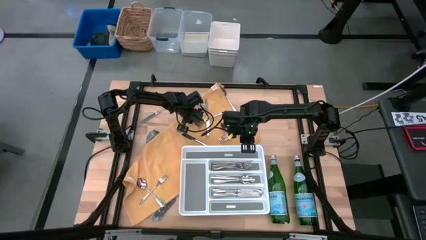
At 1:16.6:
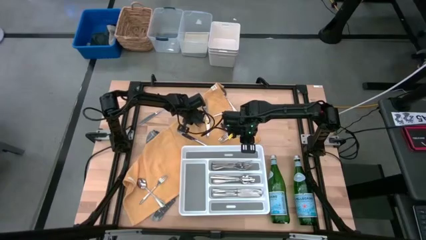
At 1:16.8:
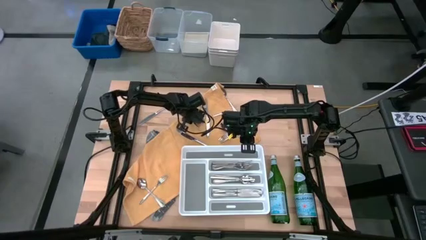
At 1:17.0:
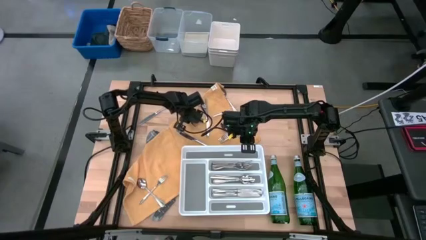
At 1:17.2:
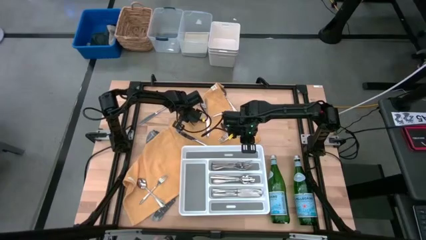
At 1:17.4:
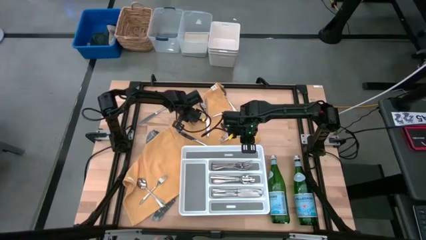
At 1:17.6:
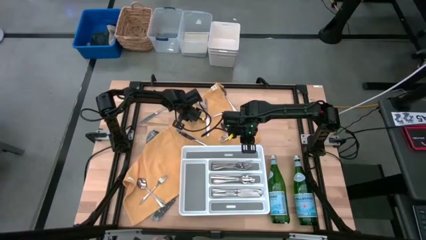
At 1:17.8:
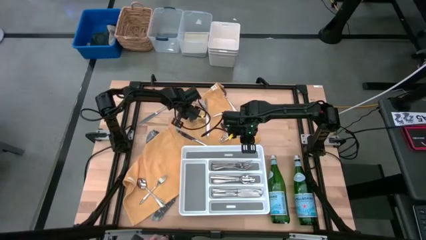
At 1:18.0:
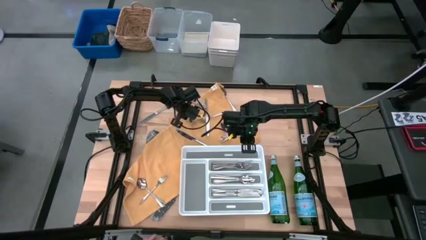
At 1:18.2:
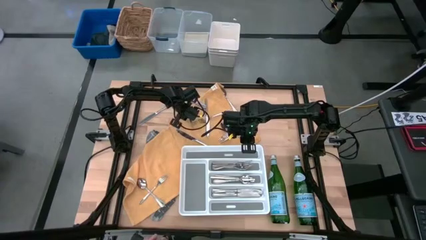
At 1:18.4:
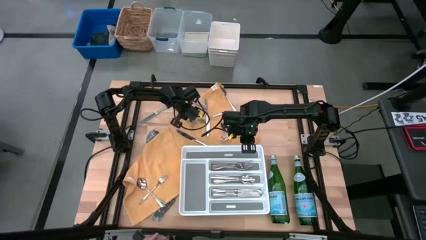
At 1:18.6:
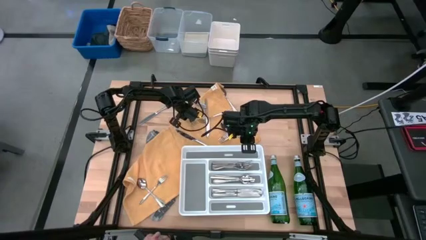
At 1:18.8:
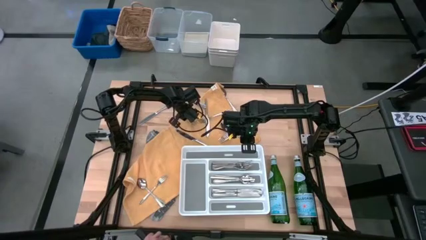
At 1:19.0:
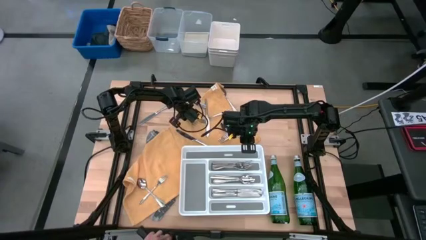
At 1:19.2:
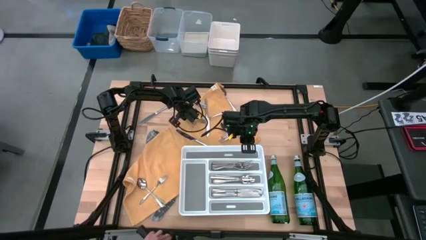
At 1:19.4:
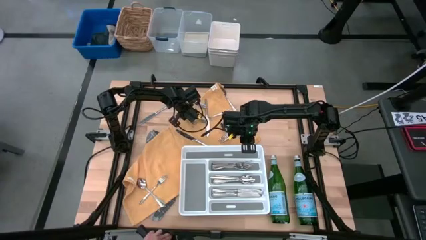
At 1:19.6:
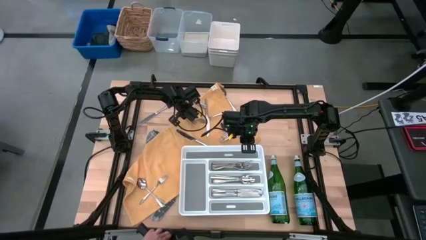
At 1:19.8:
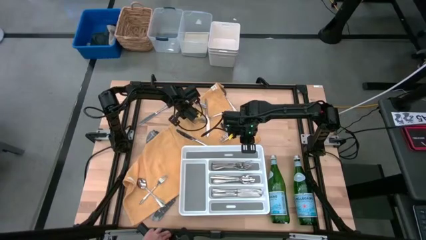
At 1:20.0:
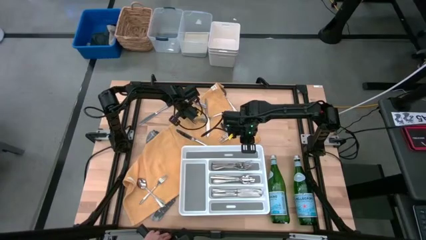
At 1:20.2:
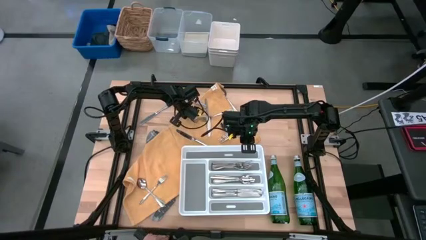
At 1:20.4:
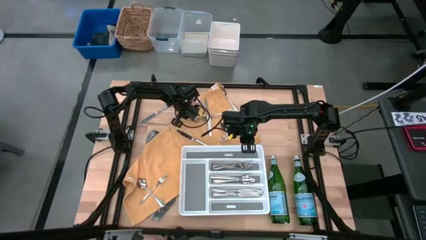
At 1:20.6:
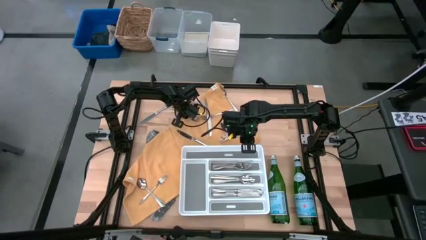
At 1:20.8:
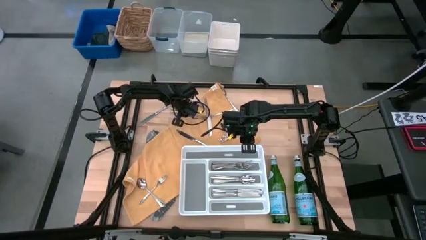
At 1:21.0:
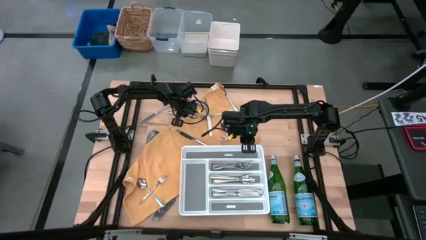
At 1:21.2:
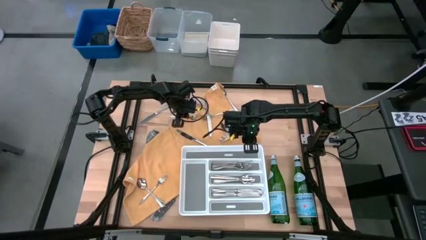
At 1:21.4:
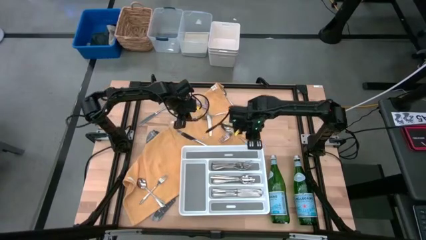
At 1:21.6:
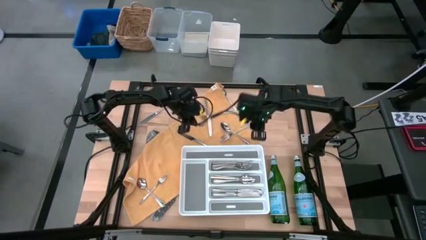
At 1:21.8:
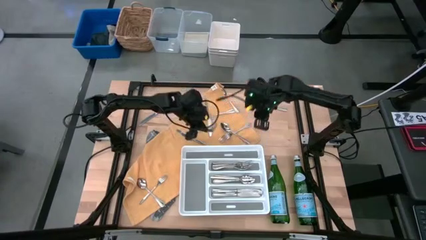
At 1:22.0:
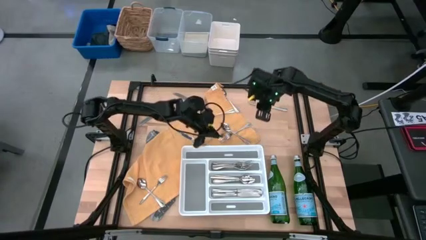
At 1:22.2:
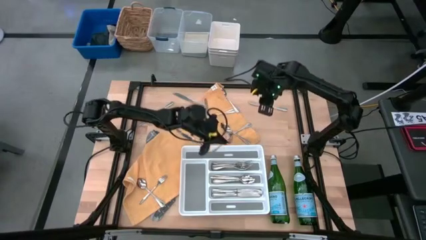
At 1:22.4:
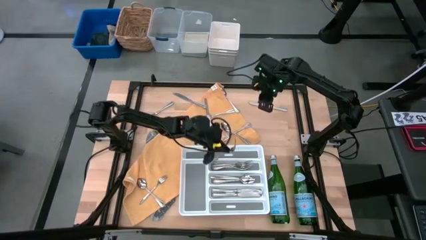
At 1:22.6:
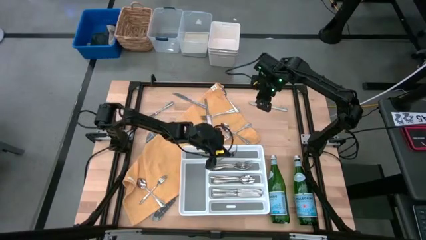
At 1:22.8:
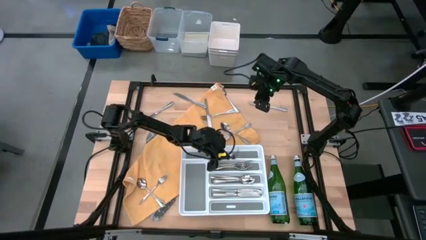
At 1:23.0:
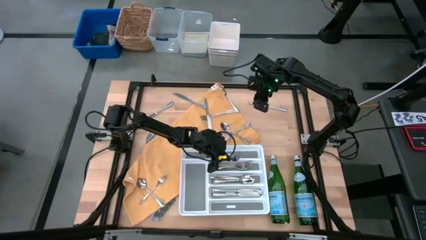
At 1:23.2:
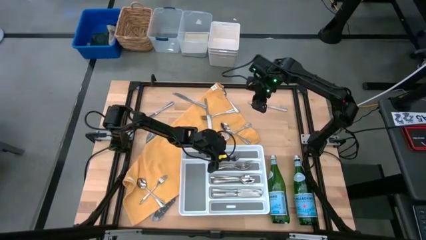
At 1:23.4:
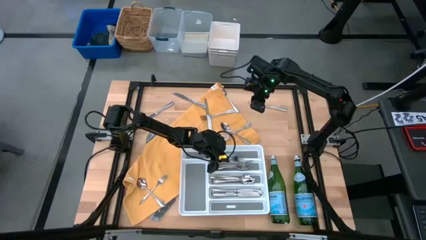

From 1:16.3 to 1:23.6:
Task: Sort silverware
Put the silver fork into the white silverware tray

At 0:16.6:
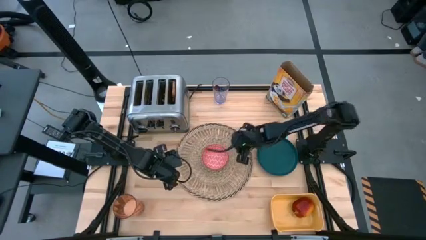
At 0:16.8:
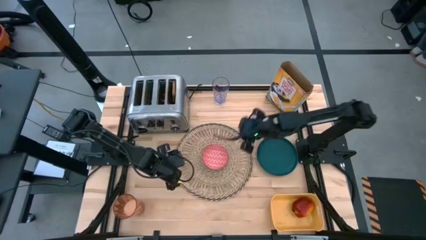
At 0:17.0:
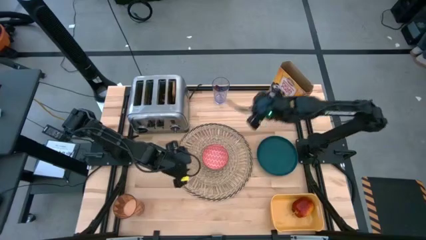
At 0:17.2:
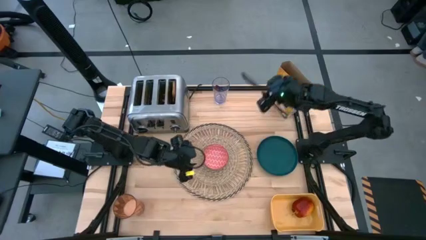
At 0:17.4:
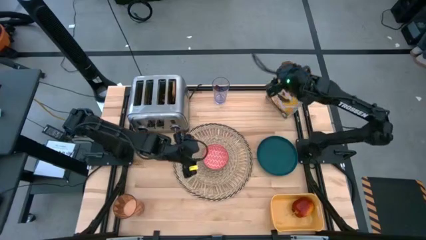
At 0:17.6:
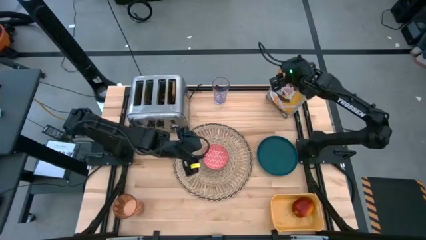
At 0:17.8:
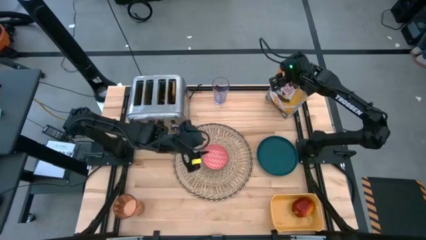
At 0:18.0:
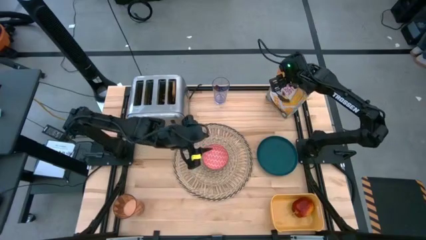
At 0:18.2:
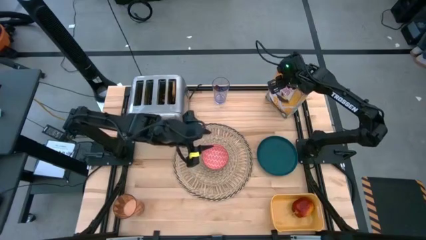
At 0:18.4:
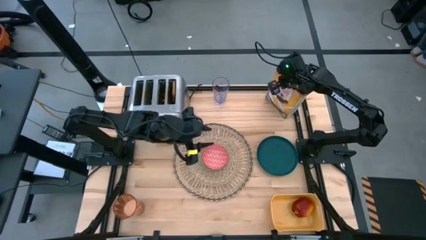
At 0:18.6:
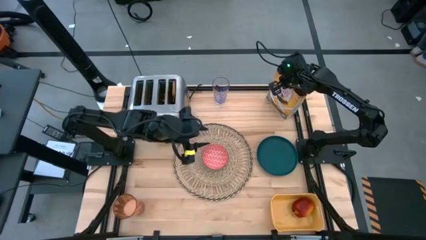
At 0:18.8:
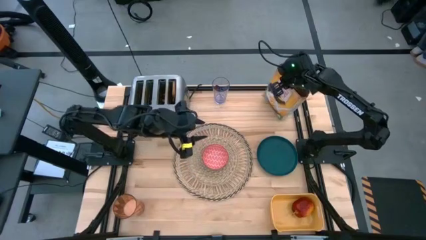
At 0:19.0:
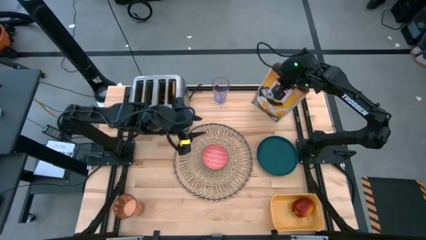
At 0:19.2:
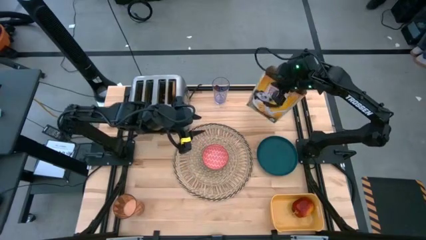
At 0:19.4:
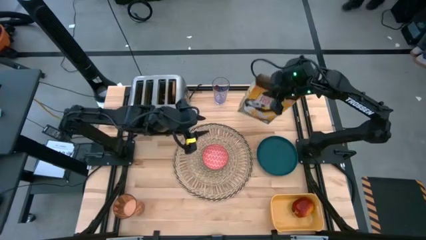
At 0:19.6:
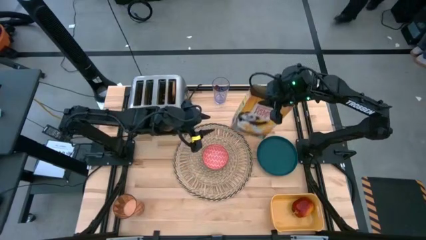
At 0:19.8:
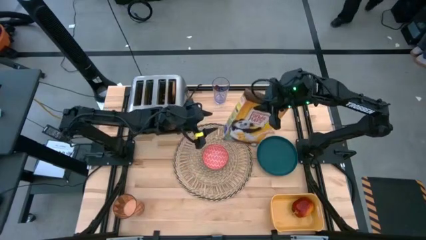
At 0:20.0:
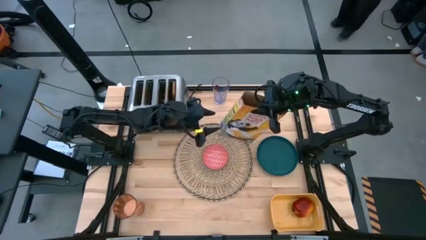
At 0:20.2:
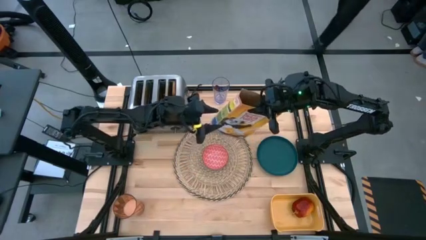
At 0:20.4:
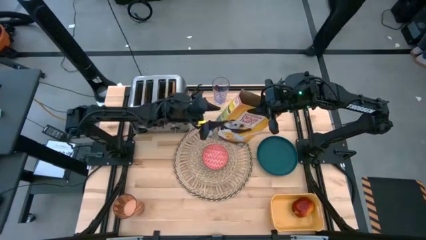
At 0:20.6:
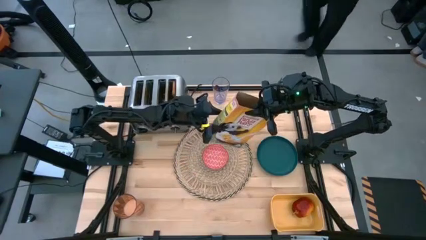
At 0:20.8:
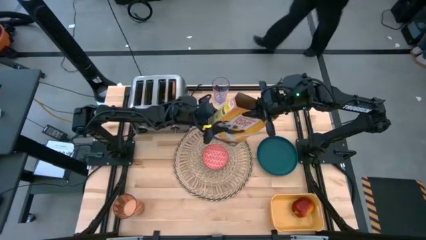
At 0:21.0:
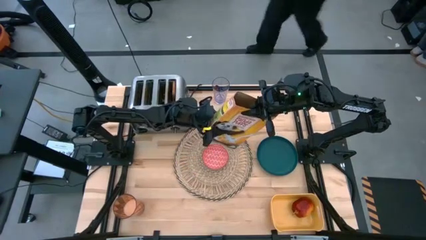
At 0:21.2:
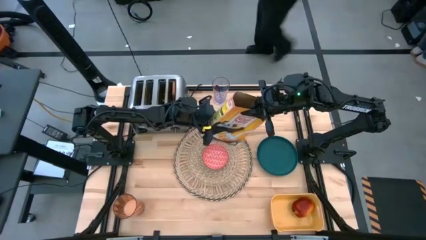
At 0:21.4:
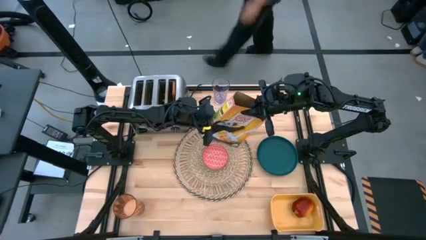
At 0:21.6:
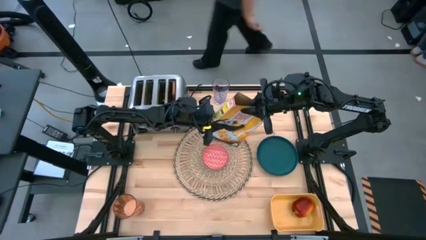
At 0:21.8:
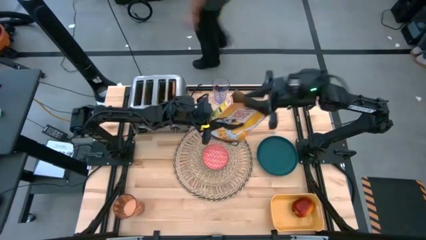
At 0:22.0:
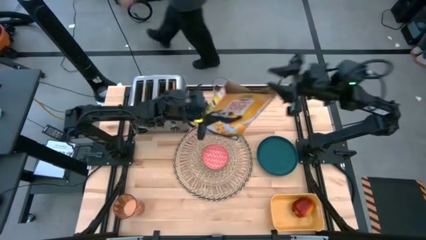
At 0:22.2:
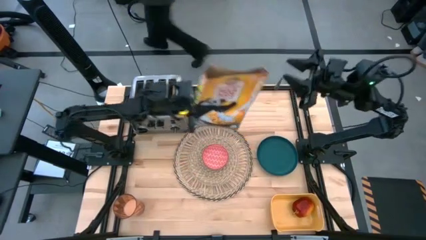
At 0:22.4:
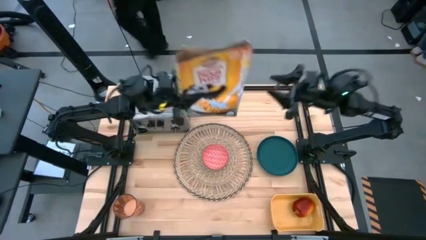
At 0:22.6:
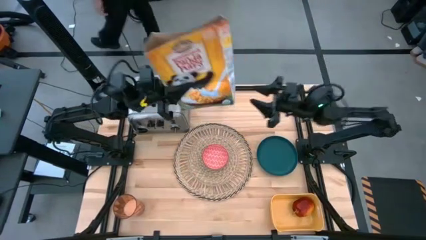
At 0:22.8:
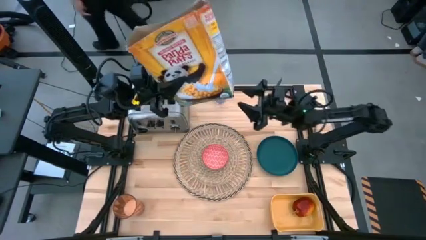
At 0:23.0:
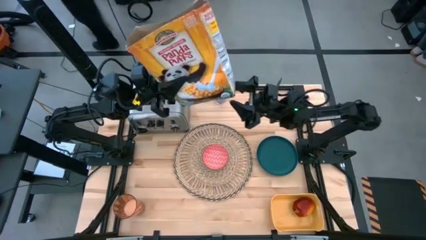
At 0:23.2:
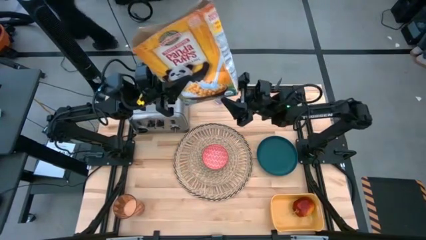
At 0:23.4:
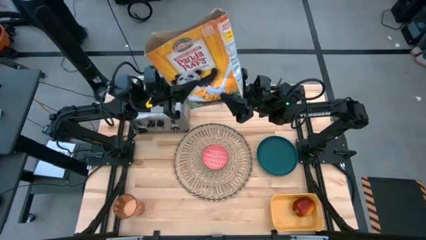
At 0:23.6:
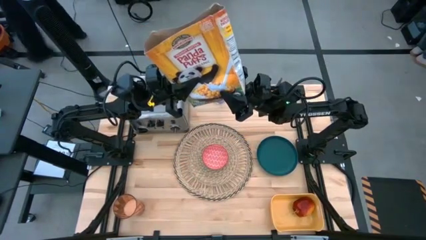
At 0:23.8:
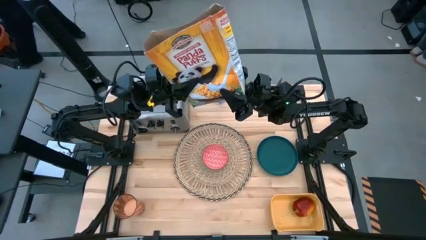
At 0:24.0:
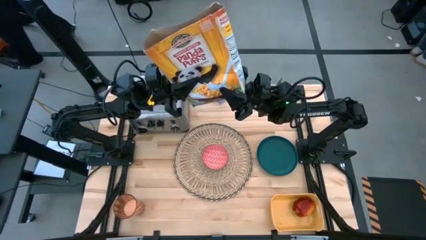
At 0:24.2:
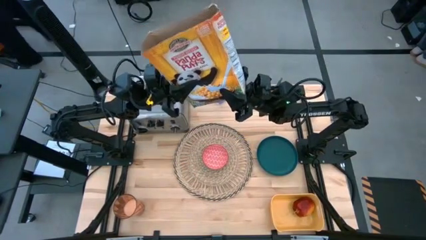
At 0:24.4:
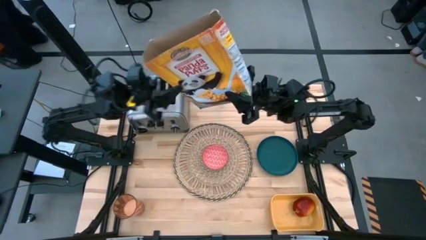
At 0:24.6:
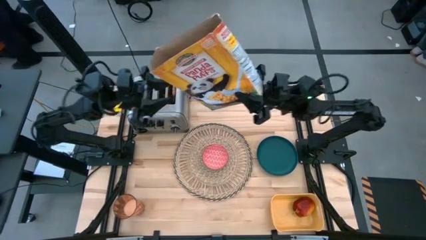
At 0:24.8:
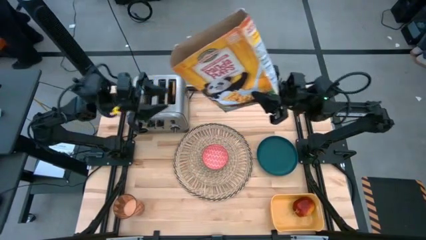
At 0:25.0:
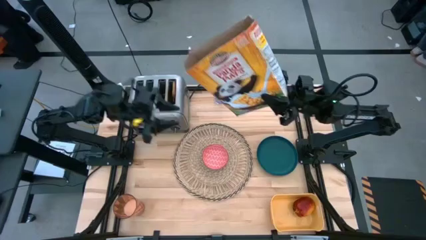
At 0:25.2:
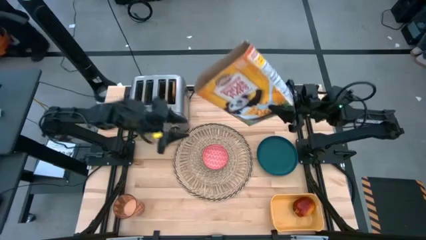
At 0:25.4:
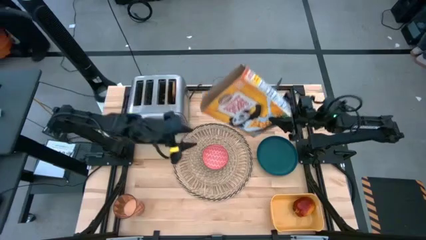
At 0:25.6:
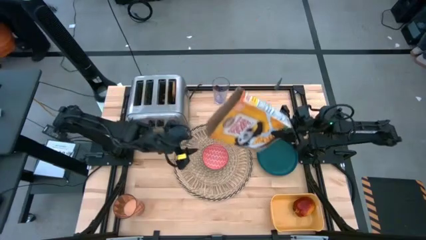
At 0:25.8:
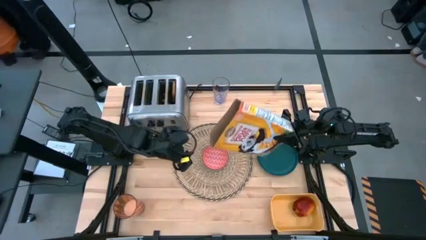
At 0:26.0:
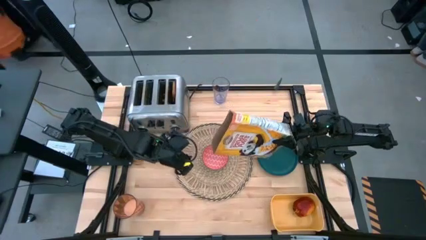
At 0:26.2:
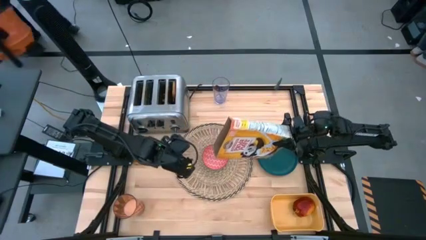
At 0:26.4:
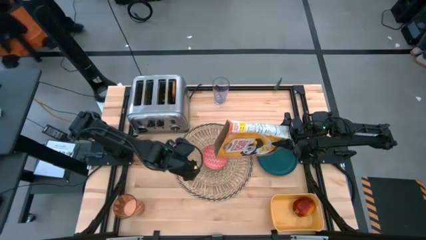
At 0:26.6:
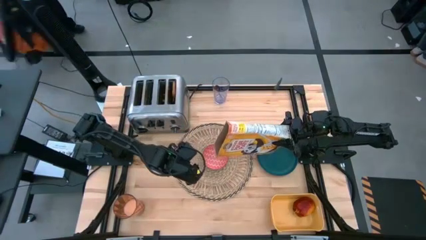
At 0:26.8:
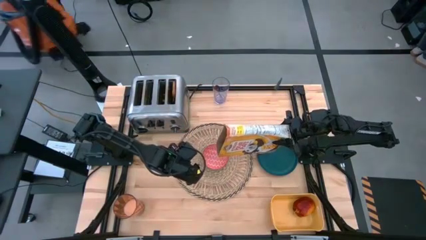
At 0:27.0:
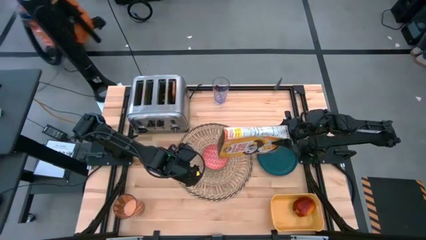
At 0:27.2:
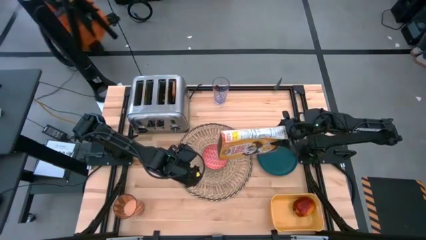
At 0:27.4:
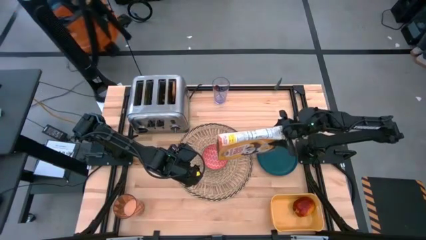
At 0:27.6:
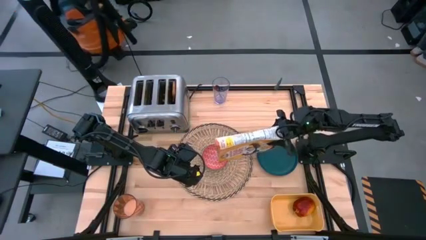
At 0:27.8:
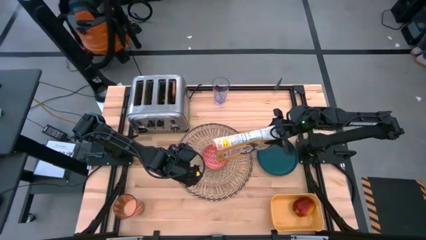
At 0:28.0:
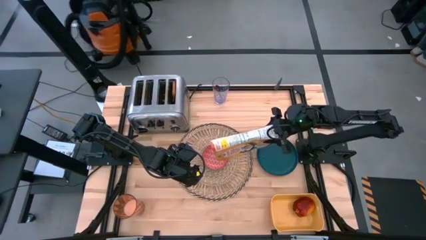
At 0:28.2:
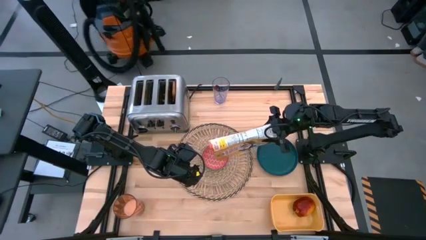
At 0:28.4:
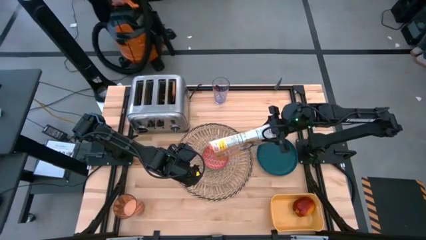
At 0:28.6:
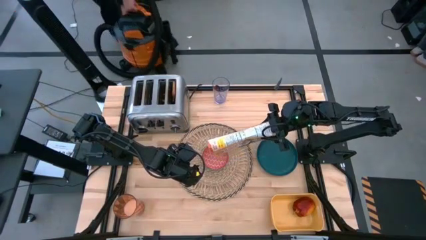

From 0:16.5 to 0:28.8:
Task: Arrange a breakfast setting
Pour the cereal into the red bowl
